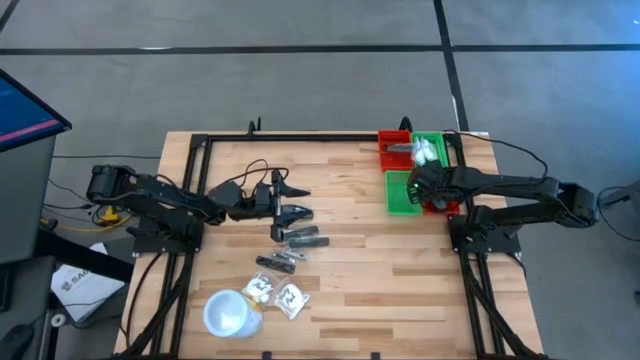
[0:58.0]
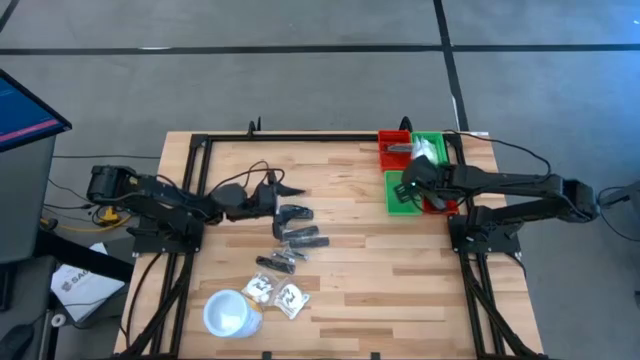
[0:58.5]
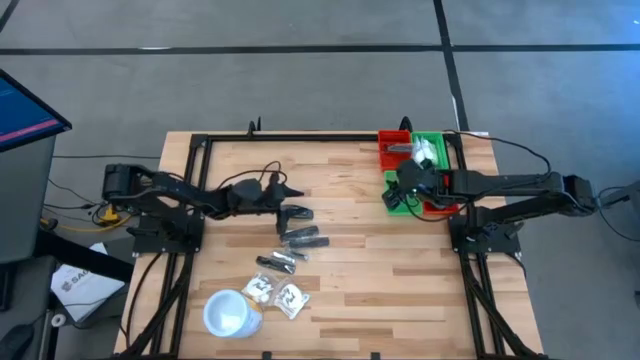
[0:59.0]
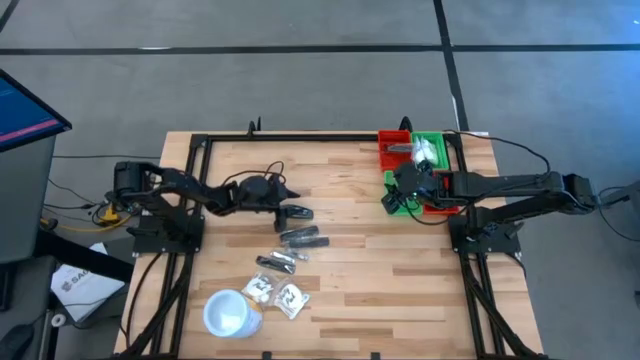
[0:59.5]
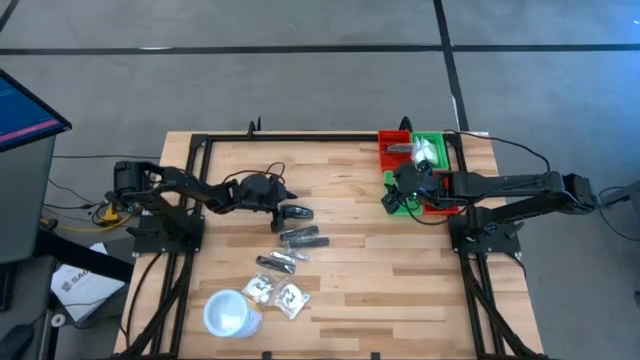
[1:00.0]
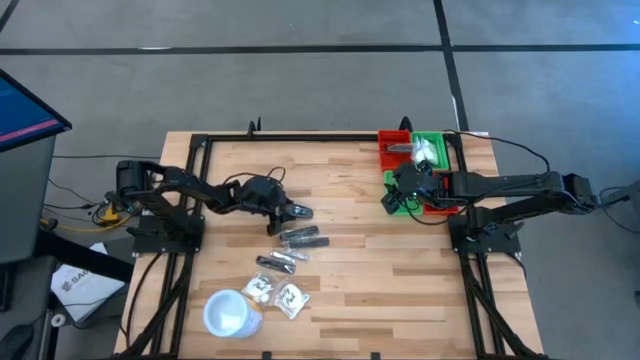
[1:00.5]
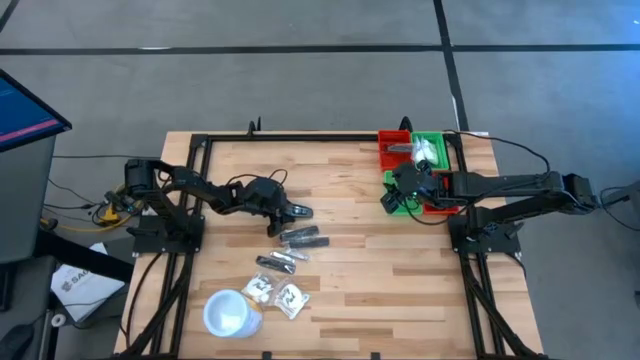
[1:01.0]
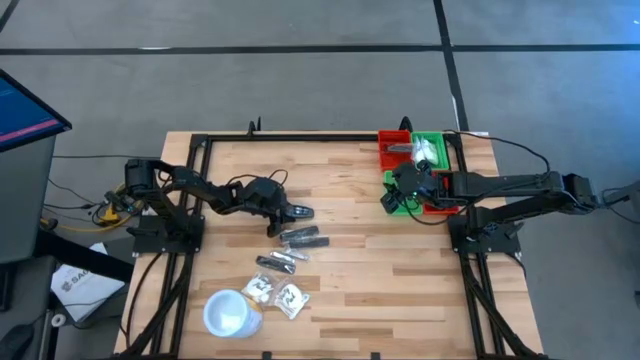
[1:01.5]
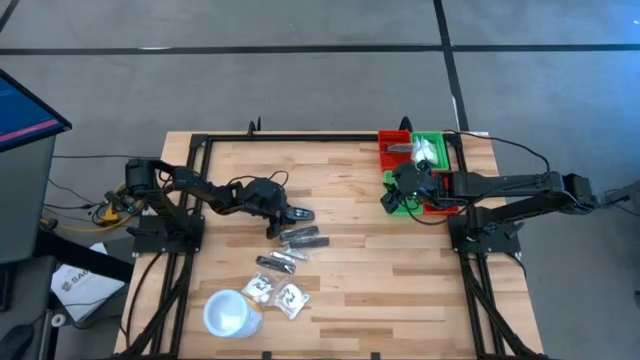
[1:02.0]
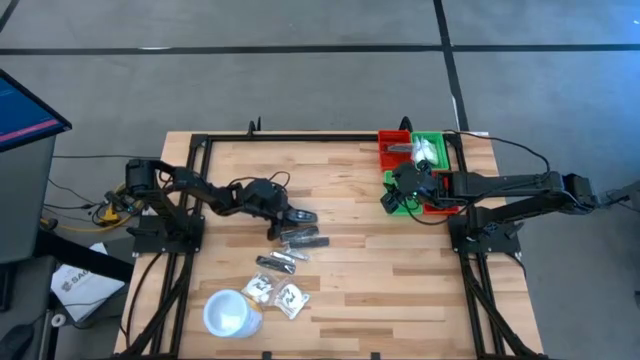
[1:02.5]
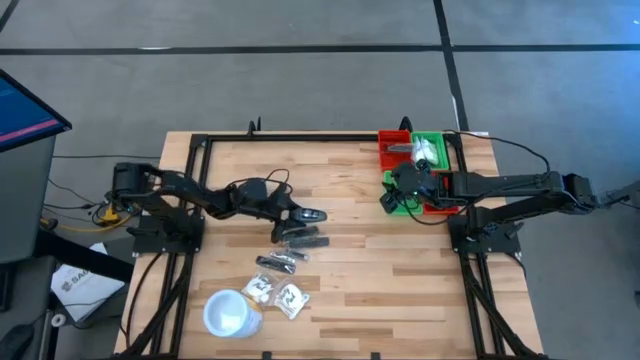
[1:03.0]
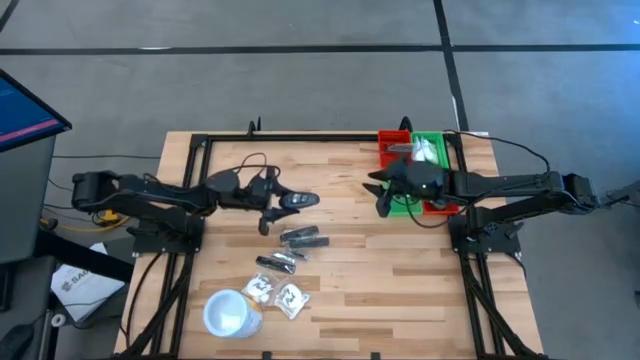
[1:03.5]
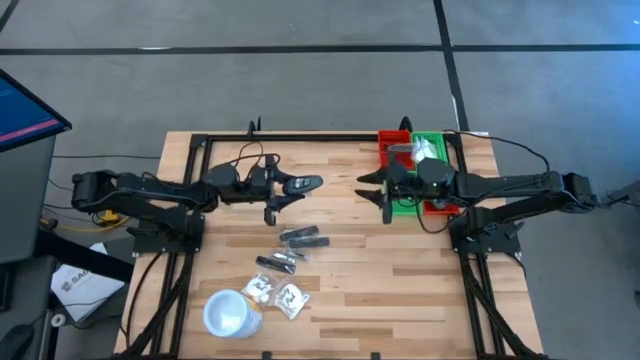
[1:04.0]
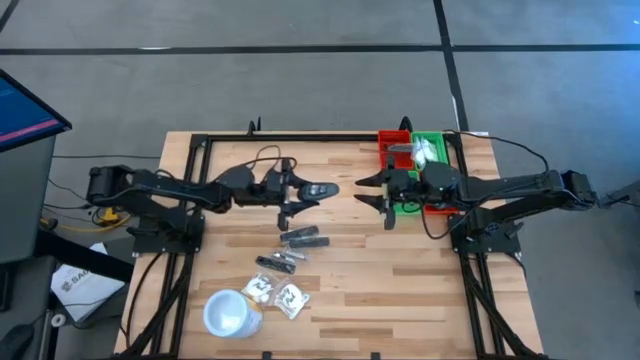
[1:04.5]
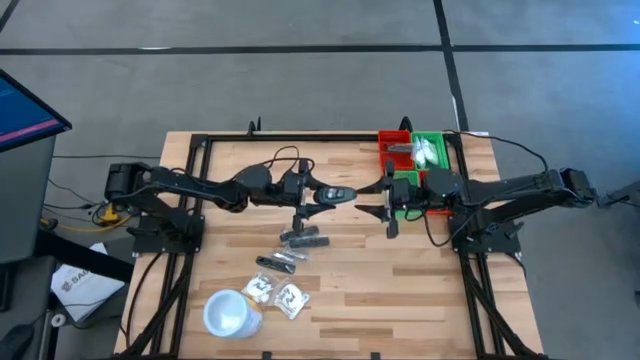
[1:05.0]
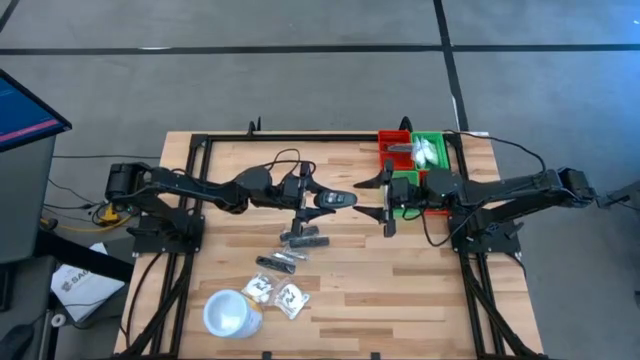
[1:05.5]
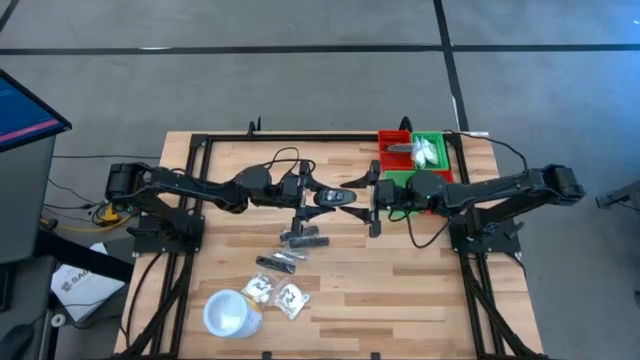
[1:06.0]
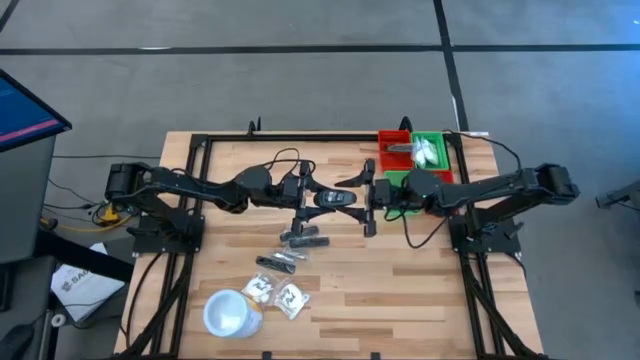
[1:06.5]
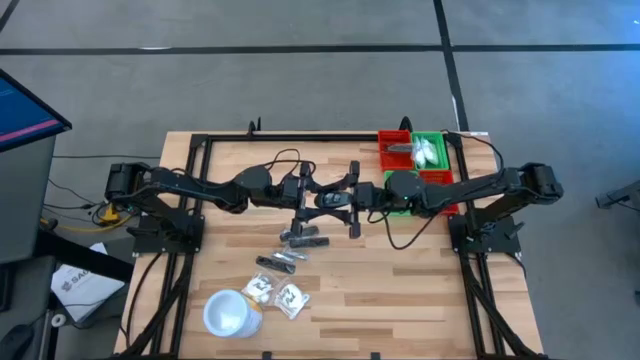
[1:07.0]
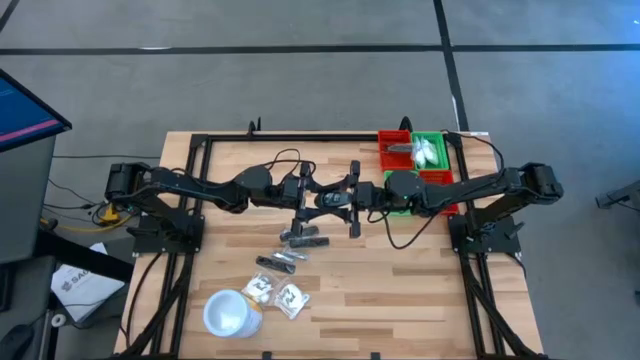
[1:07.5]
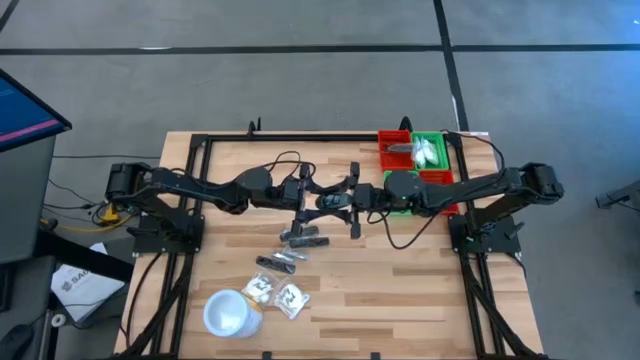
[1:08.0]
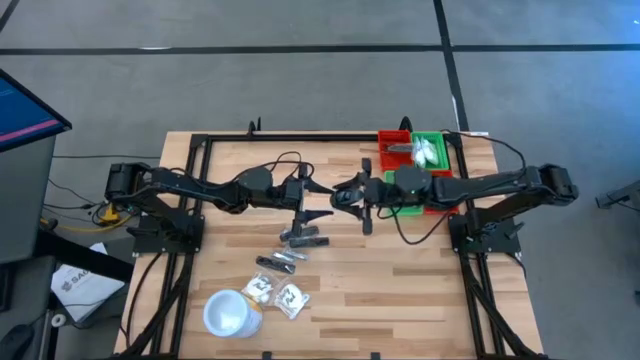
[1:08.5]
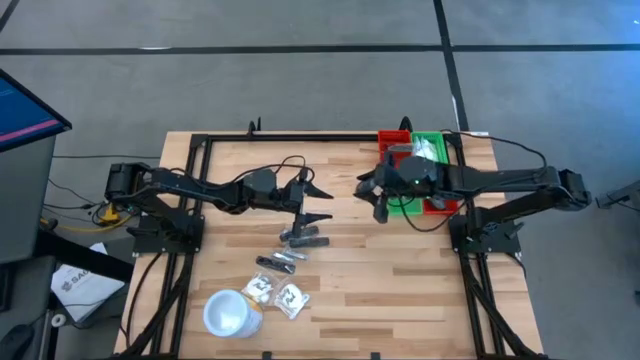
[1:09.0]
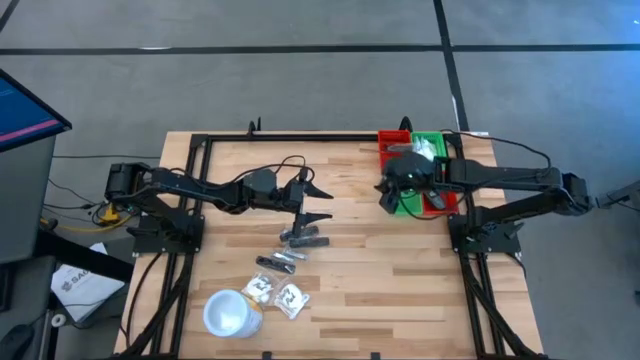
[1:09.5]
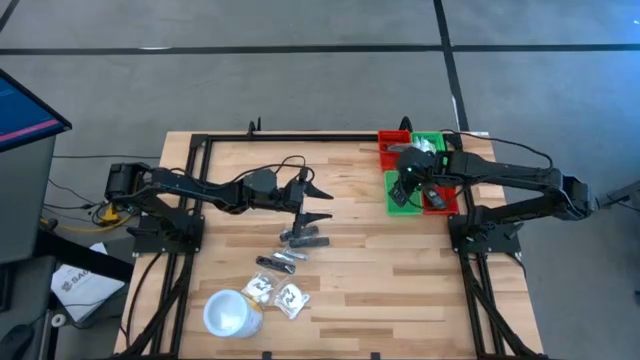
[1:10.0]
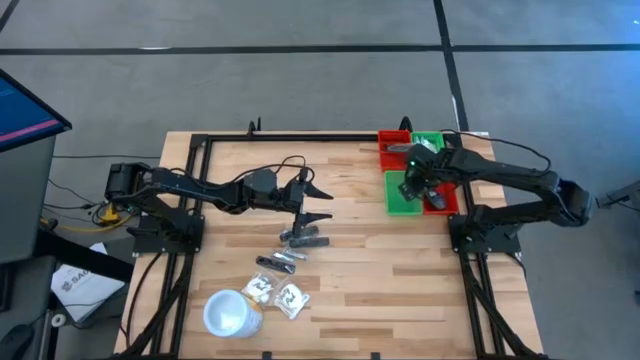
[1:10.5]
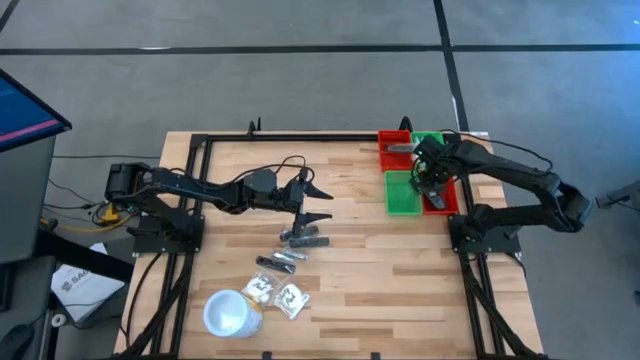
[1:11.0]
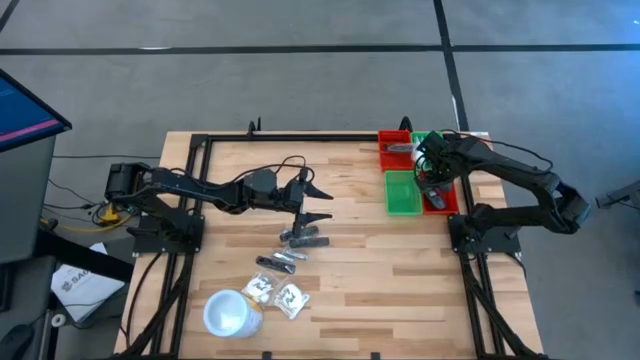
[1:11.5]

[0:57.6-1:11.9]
Task: Pick & Place Travel size toiletries
Put the gray deodorant into the bottom red bin

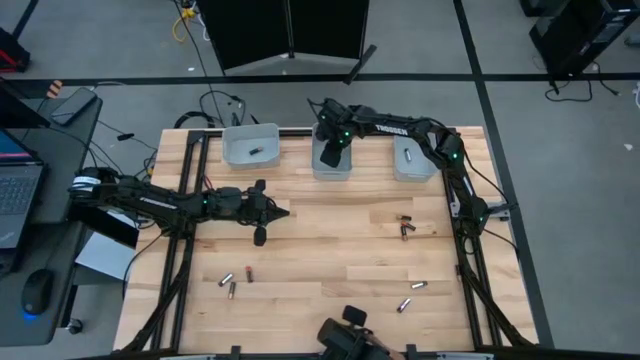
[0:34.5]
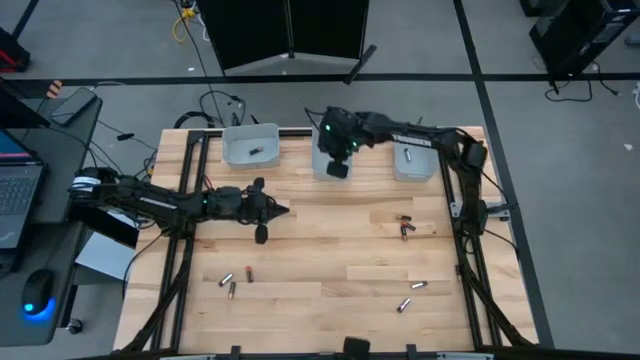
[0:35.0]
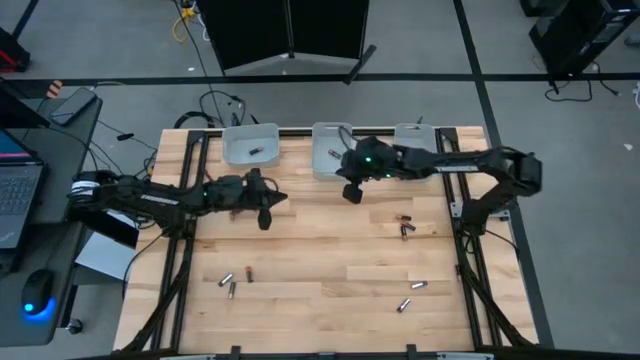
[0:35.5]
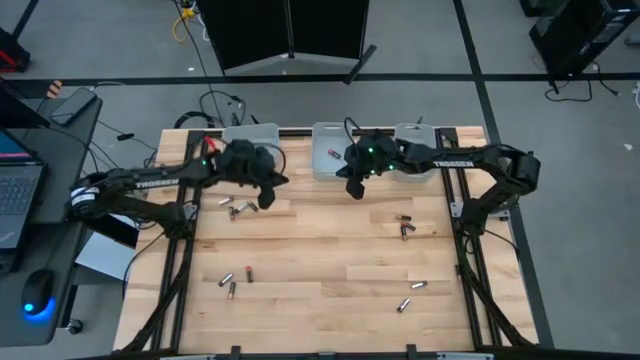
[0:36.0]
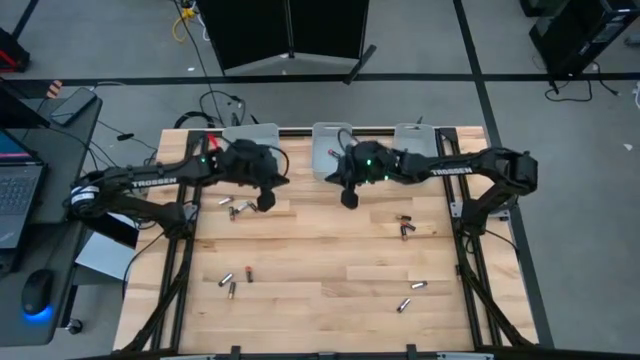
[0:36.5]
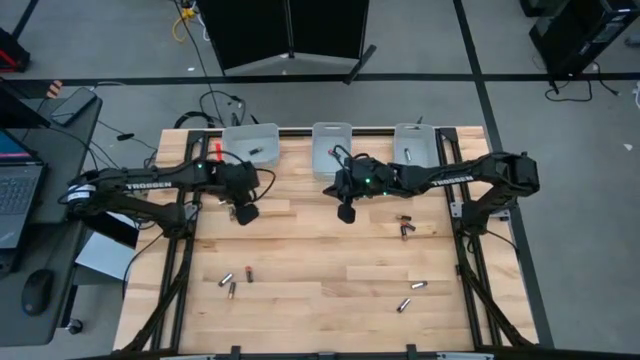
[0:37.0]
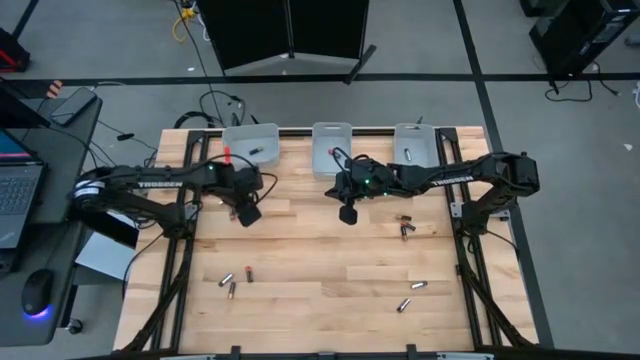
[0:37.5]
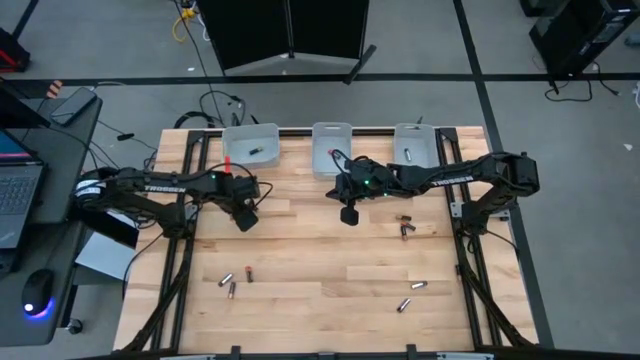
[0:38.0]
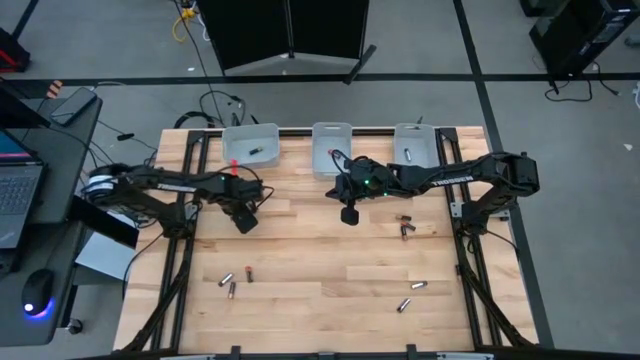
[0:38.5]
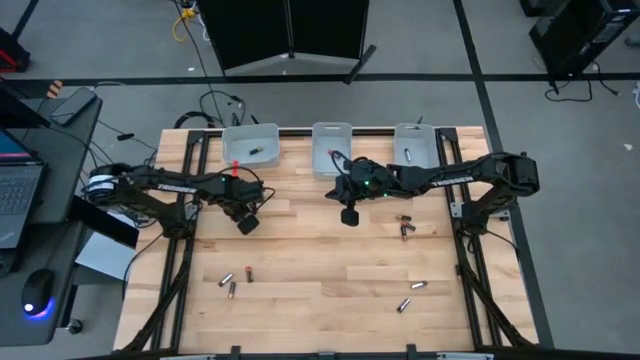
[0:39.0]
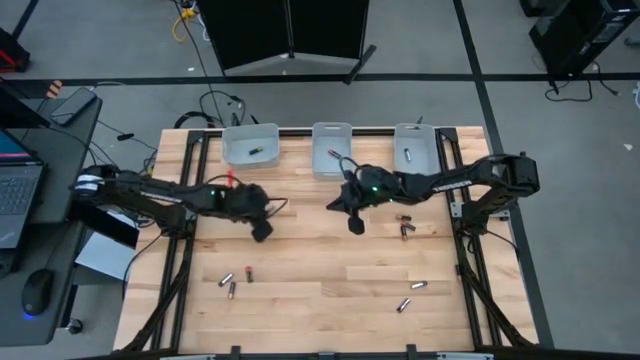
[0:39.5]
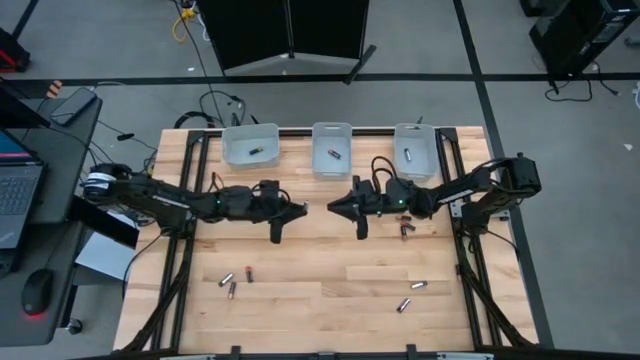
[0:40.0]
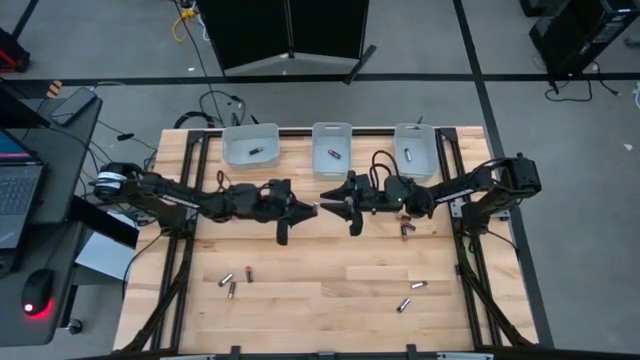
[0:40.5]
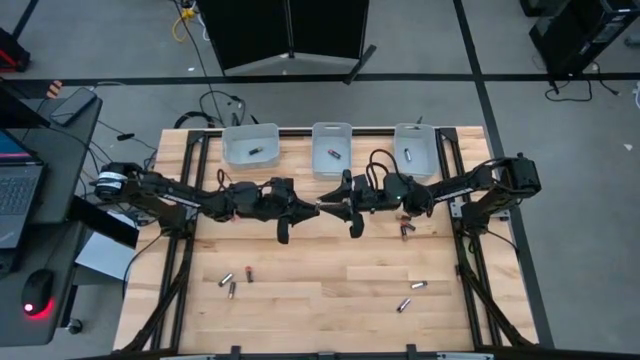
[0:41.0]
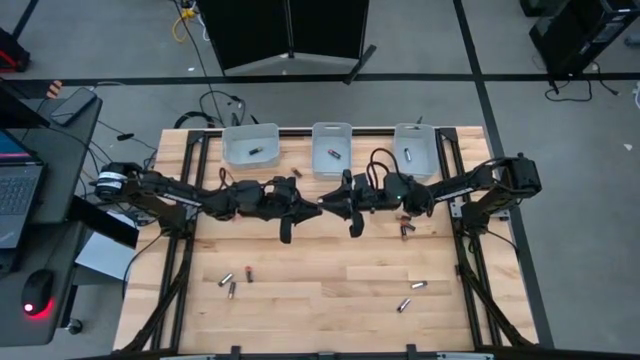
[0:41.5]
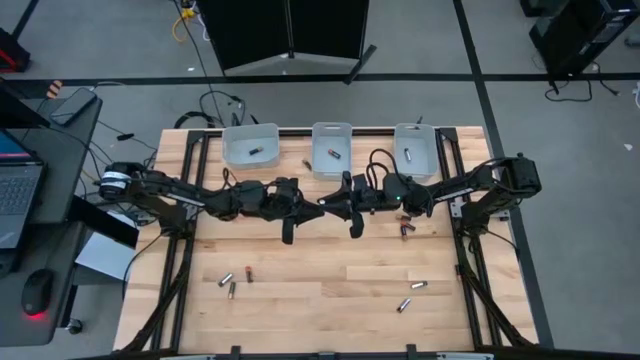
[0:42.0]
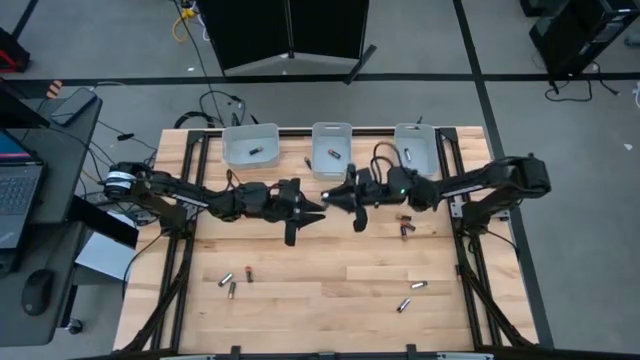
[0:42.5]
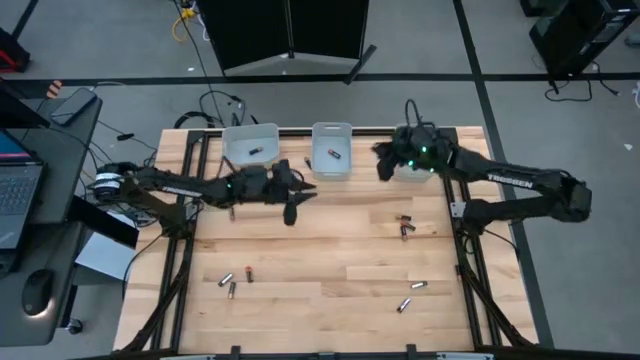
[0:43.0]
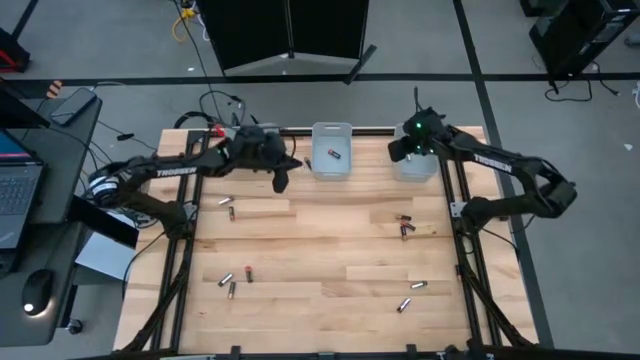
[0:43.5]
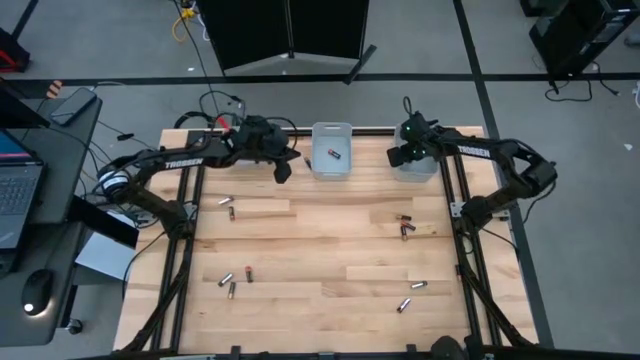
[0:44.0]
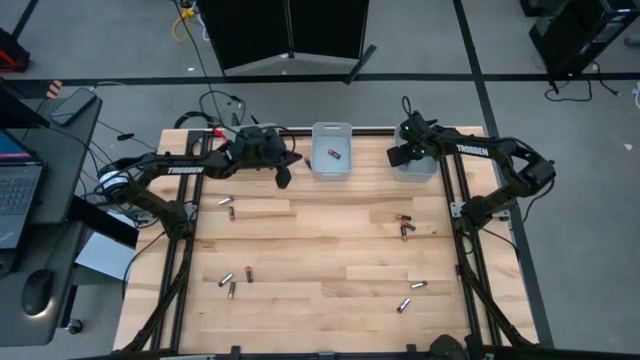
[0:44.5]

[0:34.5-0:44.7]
Task: Sort batteries
Put the black silver battery into the right bin
